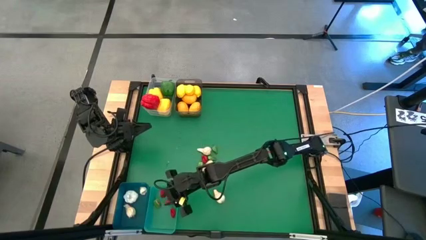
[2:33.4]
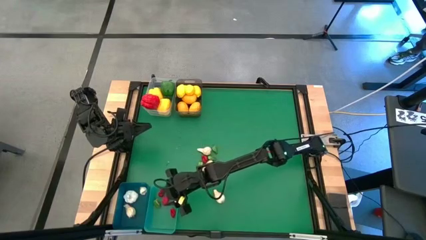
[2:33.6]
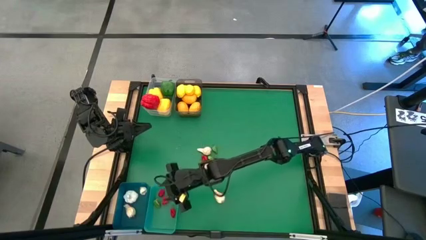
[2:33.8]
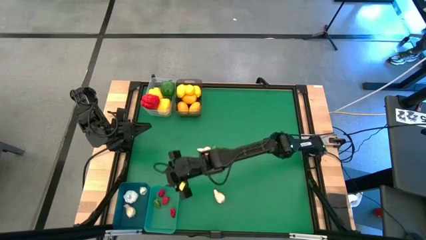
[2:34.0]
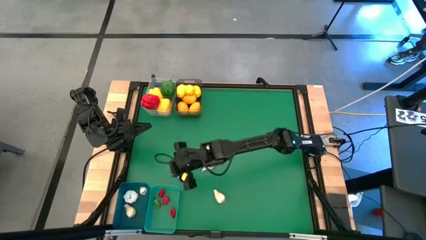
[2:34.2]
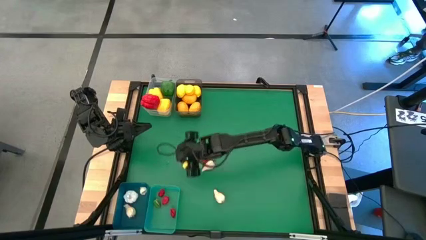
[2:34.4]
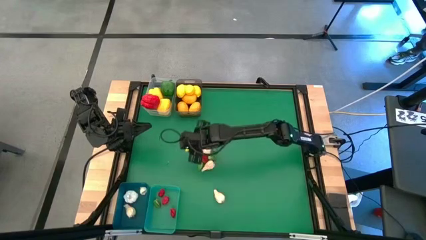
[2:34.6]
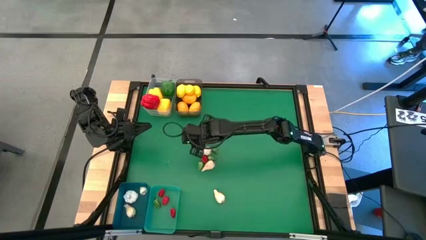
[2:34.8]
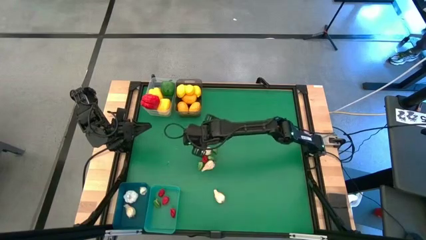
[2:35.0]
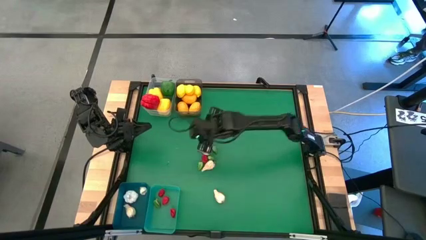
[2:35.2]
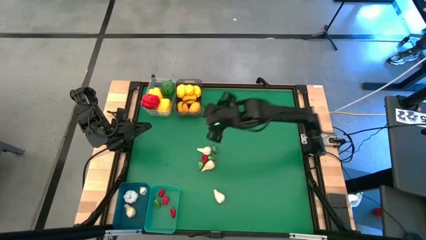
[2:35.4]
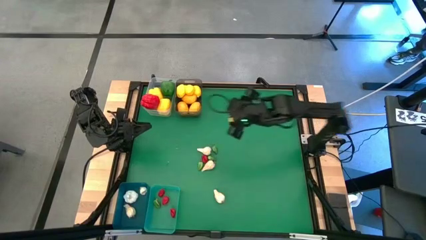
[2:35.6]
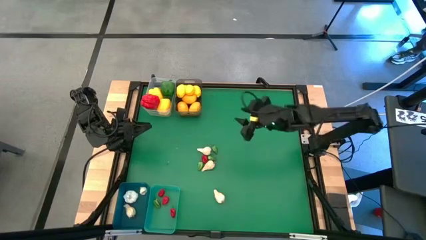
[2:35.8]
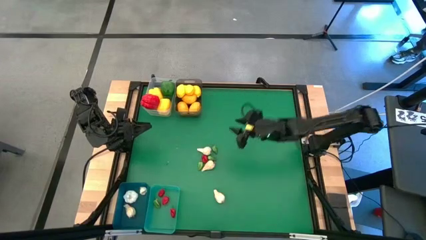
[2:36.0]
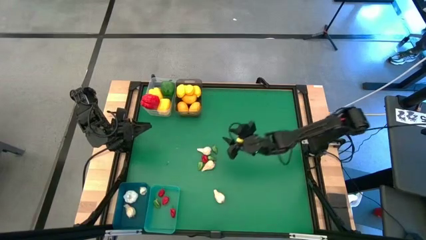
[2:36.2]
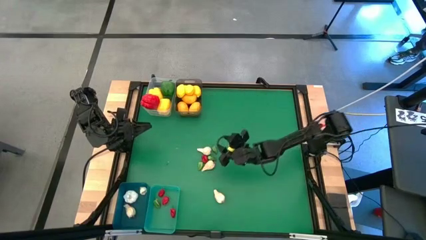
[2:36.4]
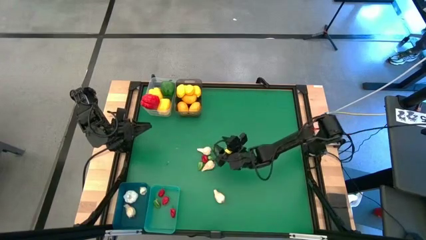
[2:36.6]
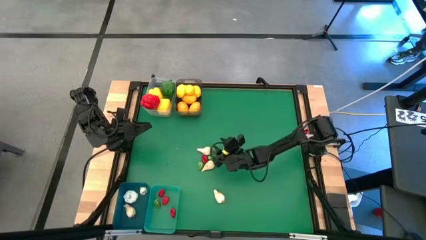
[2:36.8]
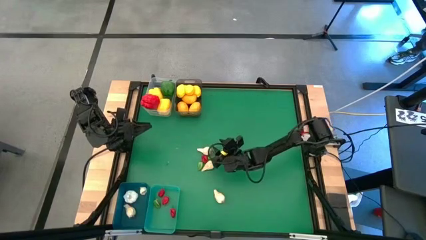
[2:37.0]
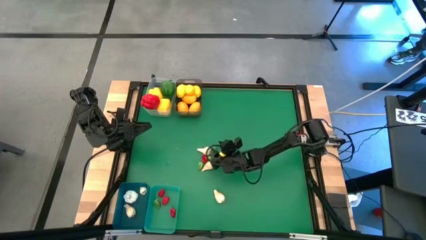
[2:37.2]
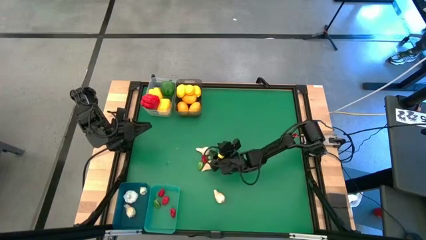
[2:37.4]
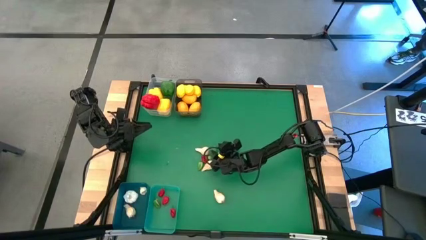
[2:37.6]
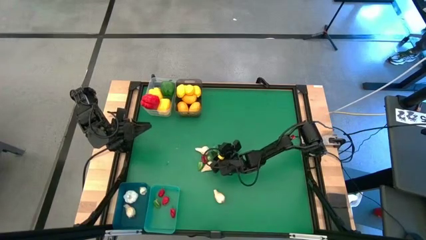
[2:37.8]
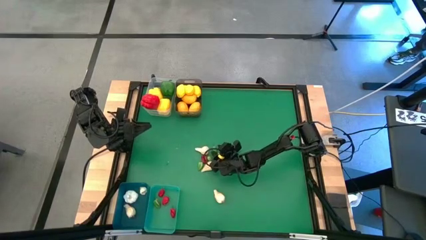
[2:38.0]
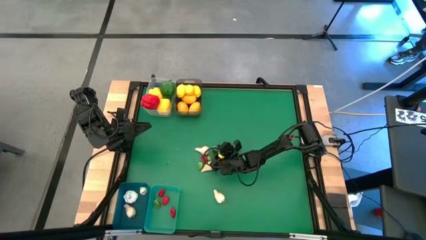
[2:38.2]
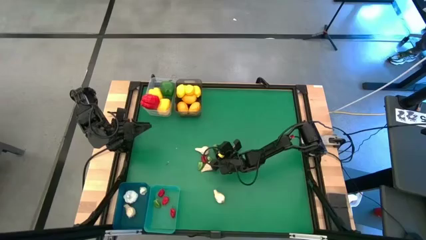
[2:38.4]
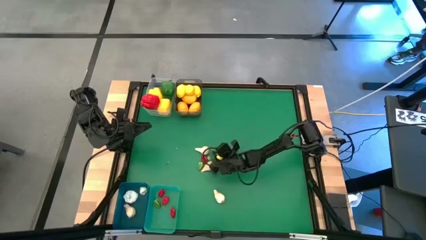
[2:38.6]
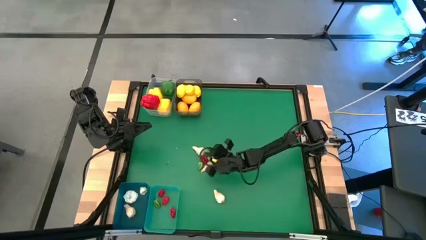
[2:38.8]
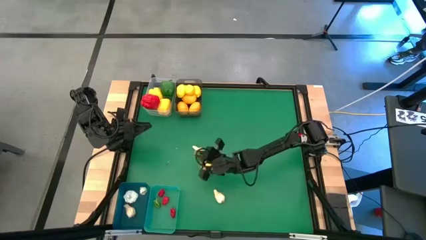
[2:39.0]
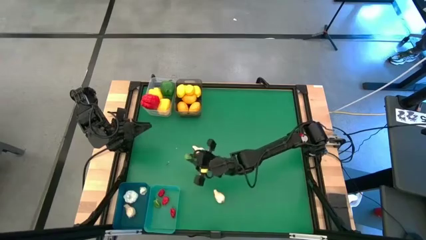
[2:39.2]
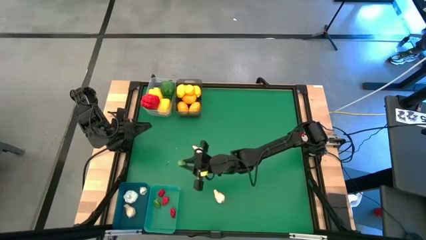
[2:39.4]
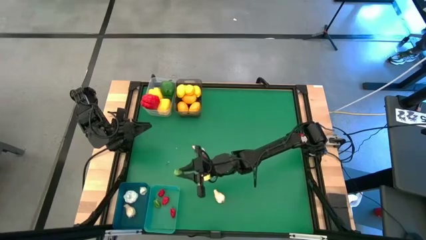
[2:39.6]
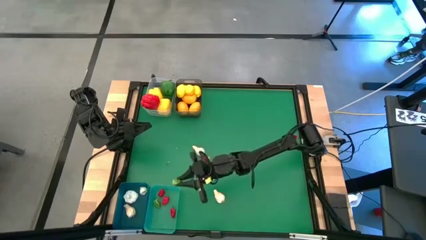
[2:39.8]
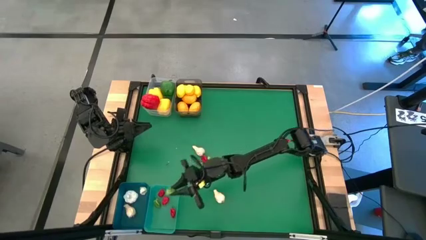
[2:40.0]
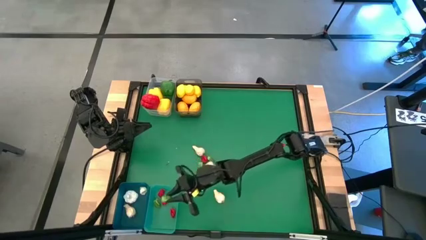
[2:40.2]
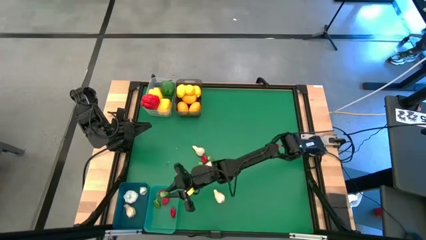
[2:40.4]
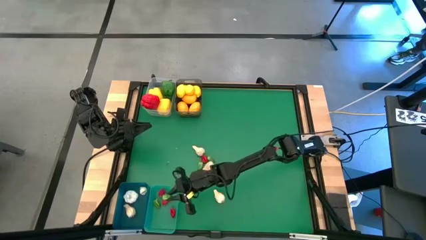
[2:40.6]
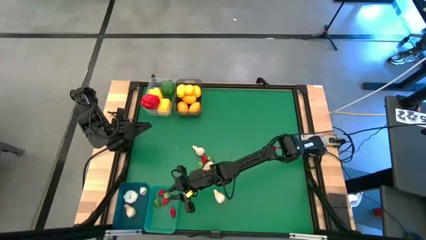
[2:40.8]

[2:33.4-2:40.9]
Task: Sort produce into baskets
Put the green chili pepper into the green bin

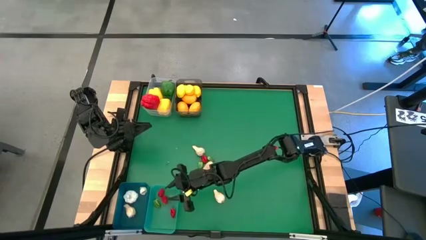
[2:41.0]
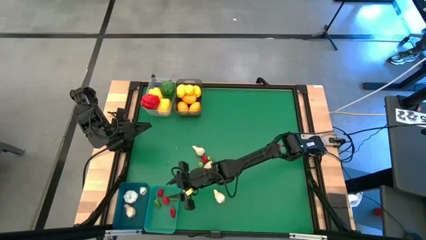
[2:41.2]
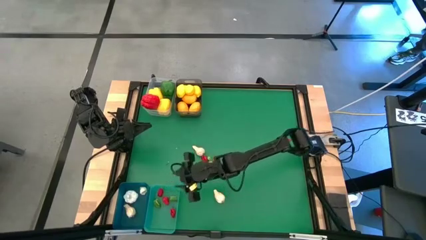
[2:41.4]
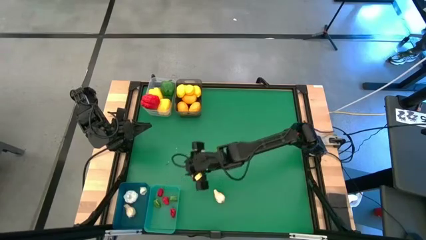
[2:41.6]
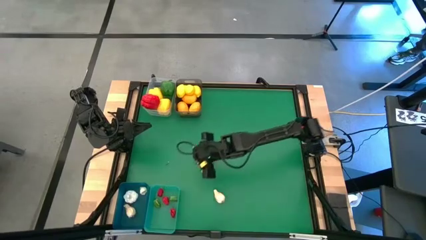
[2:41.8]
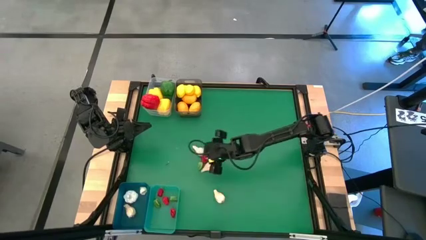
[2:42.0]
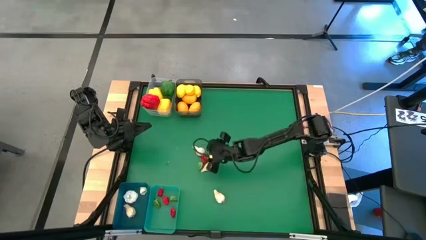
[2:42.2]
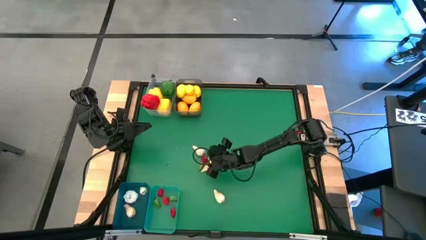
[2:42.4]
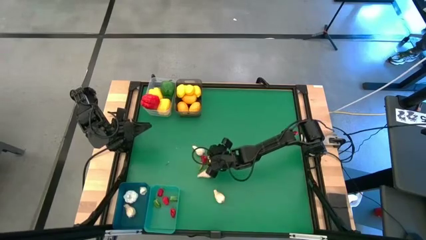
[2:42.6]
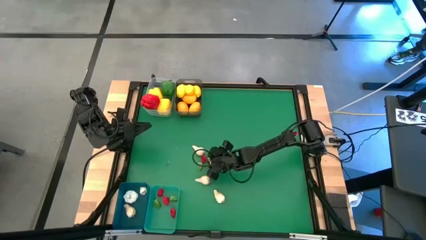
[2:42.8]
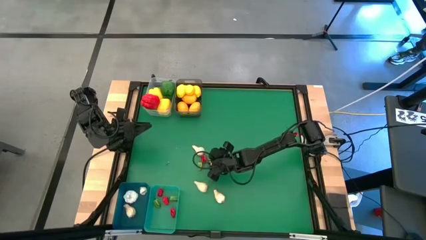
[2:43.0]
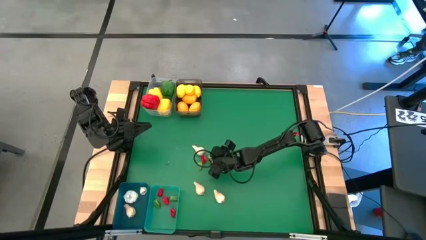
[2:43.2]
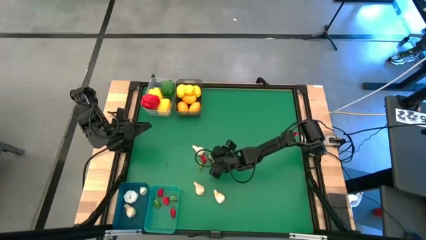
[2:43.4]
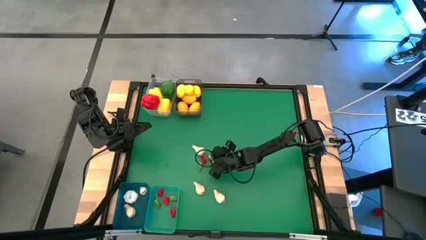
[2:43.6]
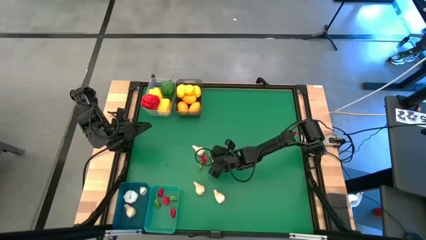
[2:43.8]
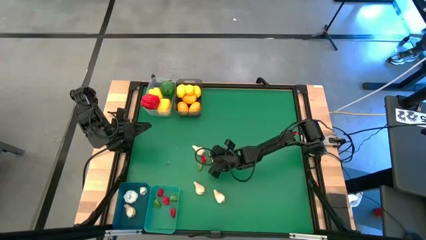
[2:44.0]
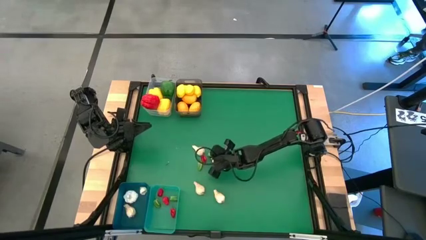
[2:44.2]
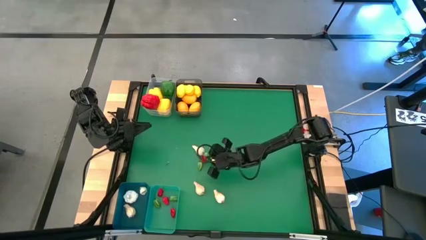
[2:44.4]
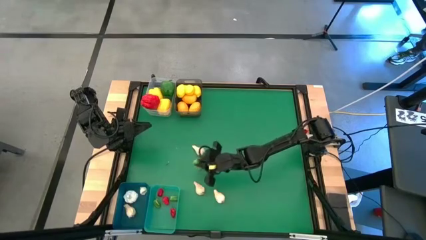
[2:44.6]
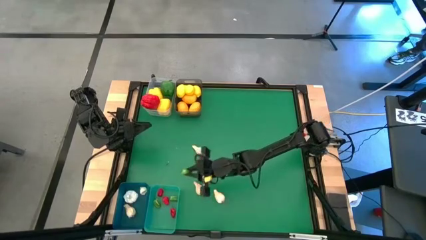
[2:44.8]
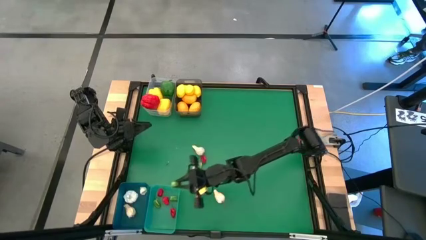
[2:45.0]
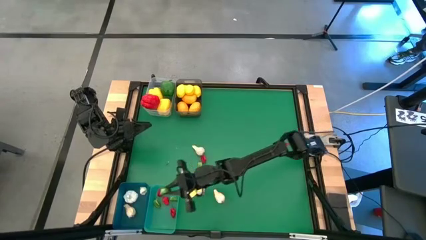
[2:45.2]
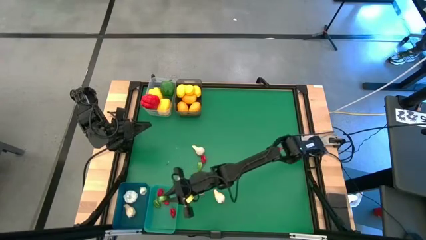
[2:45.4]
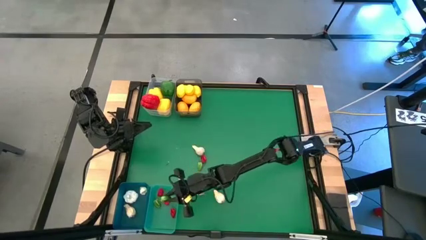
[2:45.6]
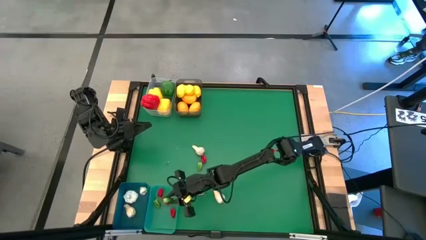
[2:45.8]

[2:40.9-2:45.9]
Put the green chili pepper into the green bin

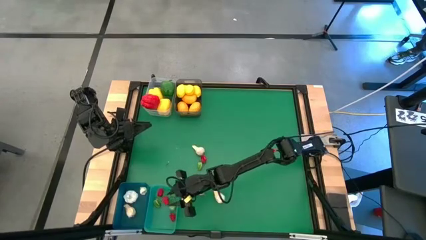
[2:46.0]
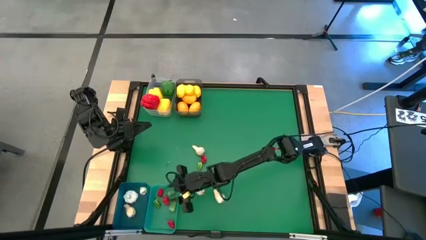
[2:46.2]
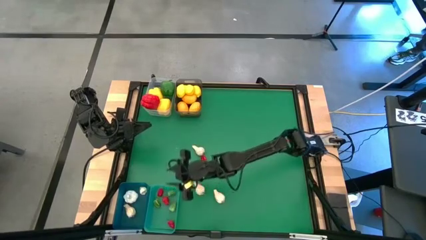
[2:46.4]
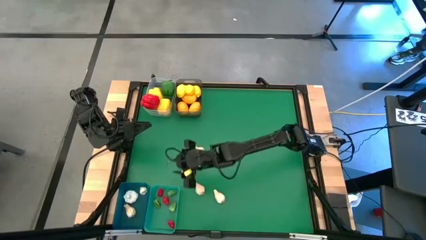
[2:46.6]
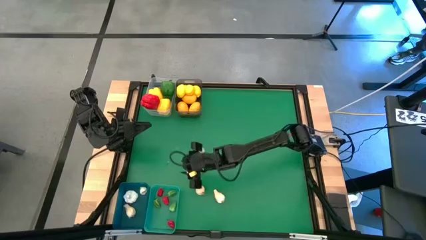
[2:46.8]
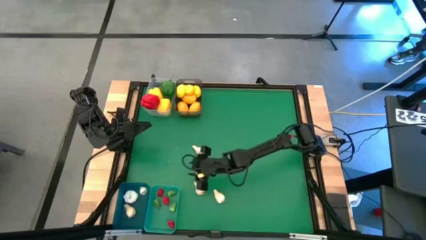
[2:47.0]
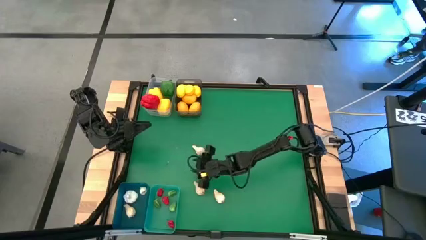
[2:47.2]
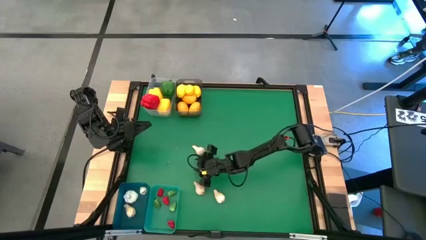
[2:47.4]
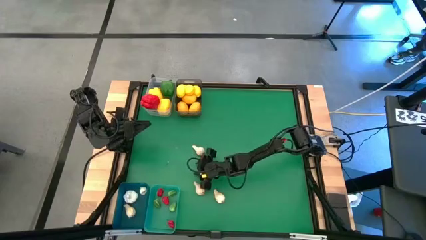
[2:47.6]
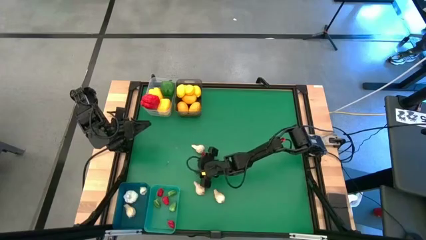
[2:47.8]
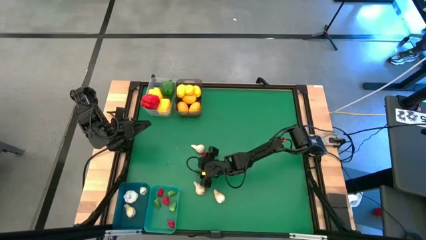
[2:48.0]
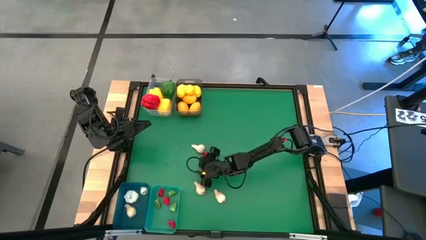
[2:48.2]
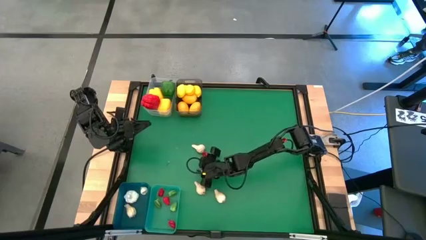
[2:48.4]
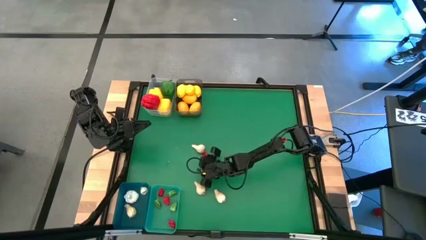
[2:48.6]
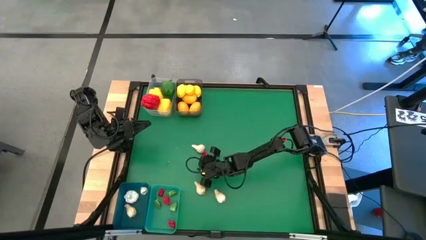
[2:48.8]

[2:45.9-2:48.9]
Put the green chili pepper into the green bin

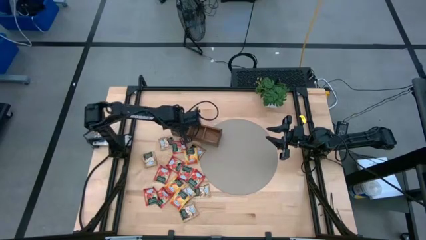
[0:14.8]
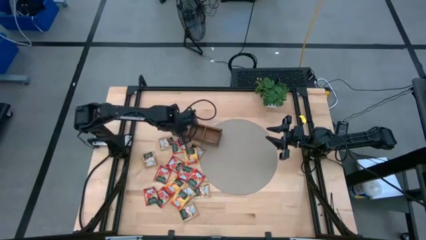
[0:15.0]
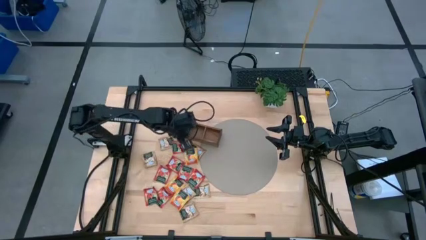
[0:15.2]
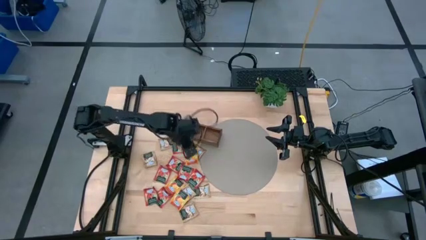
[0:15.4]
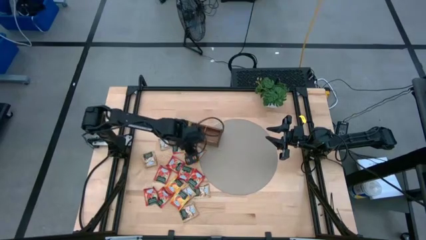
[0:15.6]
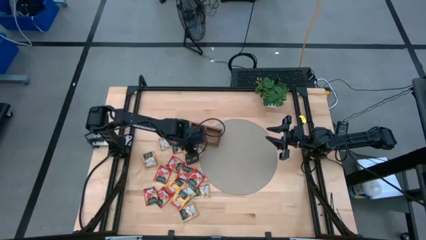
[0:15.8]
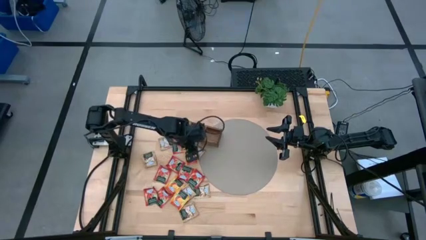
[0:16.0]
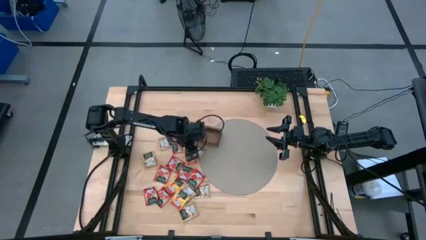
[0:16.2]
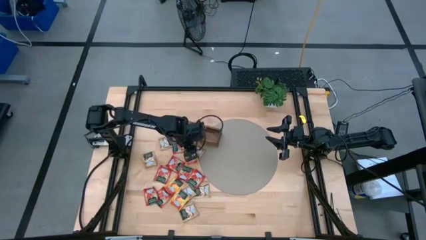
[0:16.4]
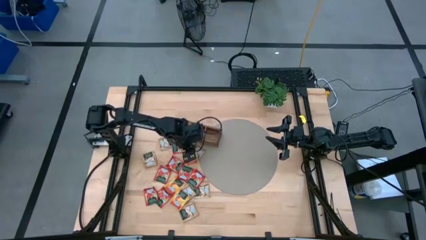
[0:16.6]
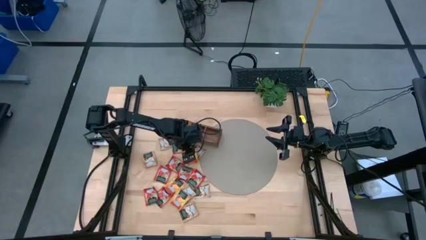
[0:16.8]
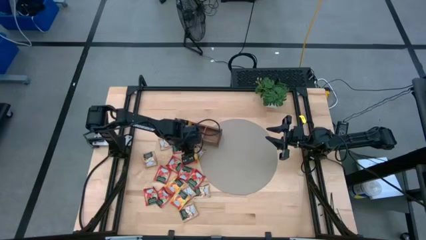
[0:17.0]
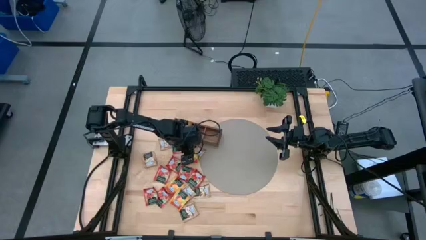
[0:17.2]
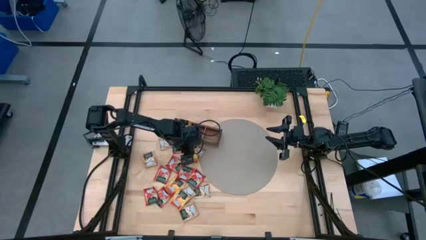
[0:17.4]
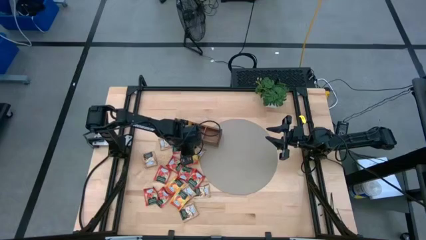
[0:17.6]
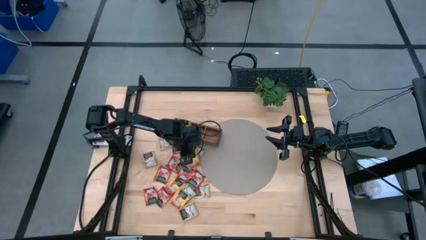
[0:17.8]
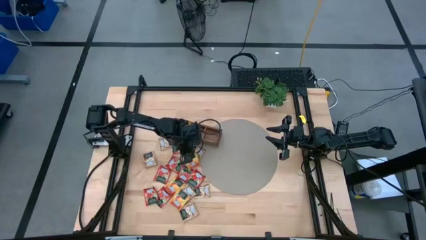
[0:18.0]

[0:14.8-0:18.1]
Task: Pick & Place Tea
Put the yellow tea bag into the left section of the wooden organizer
